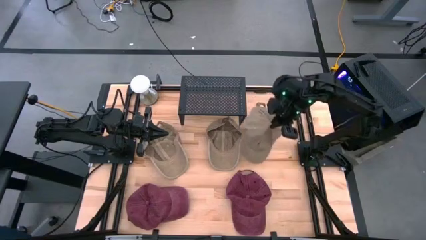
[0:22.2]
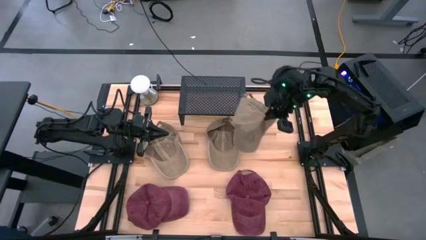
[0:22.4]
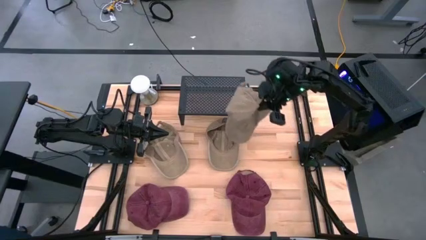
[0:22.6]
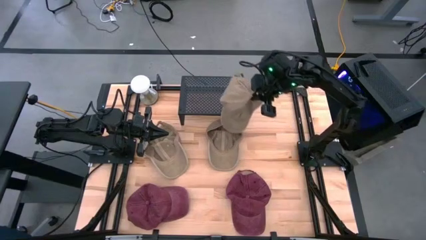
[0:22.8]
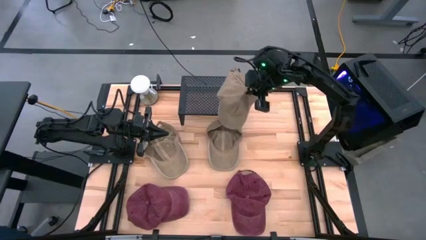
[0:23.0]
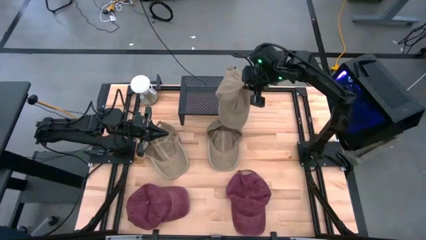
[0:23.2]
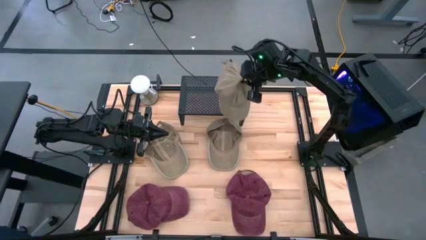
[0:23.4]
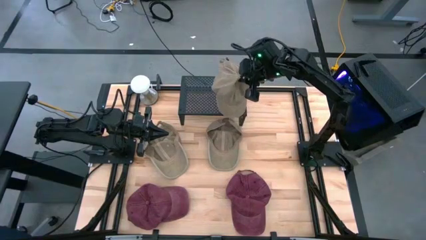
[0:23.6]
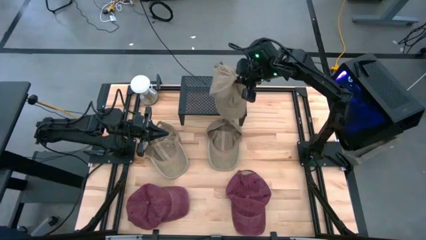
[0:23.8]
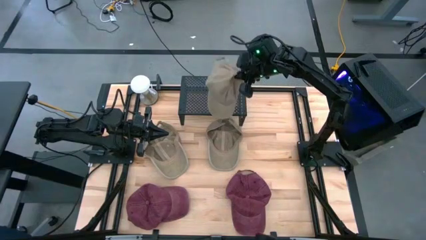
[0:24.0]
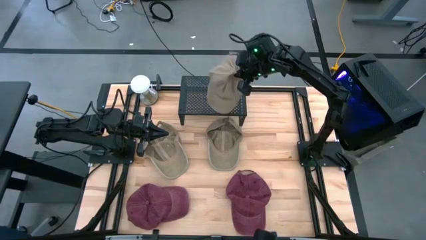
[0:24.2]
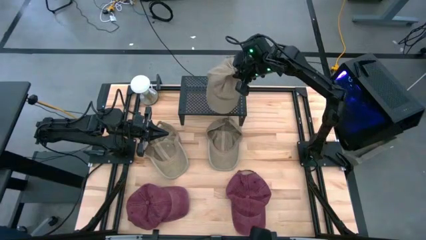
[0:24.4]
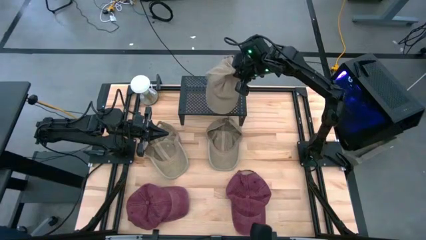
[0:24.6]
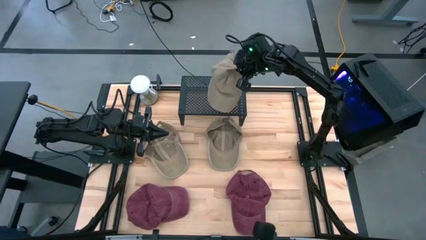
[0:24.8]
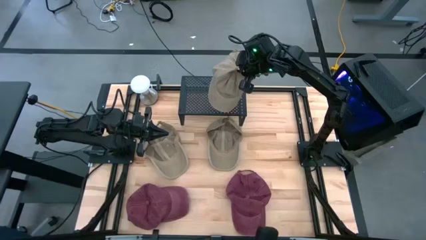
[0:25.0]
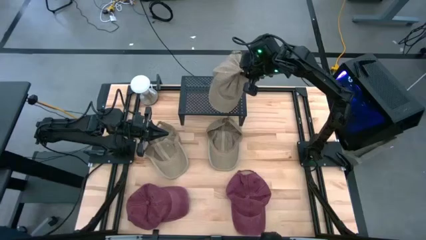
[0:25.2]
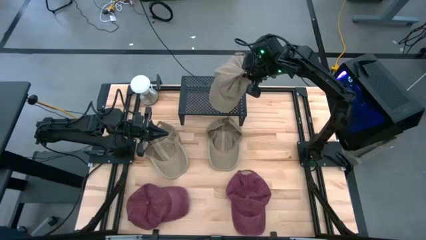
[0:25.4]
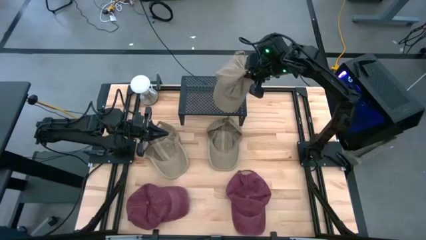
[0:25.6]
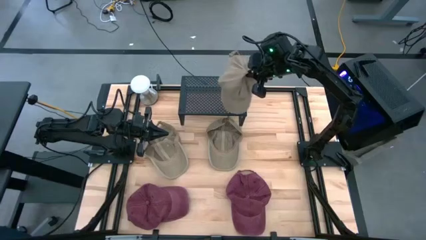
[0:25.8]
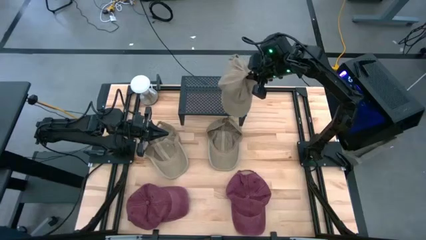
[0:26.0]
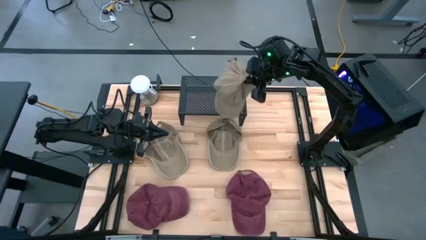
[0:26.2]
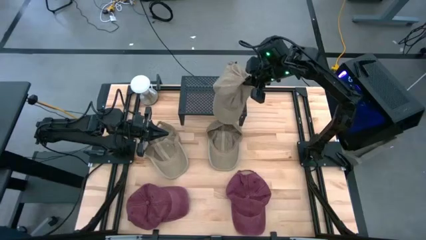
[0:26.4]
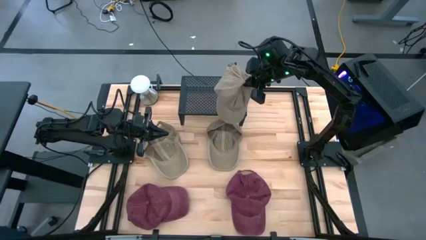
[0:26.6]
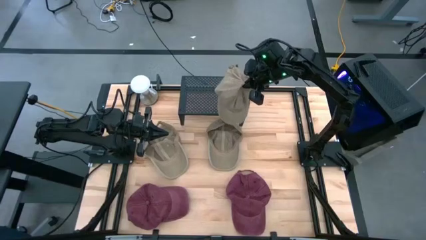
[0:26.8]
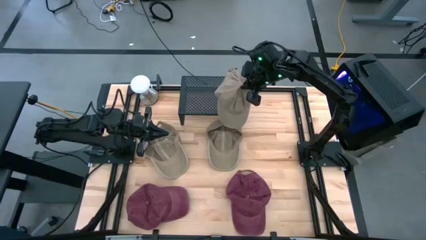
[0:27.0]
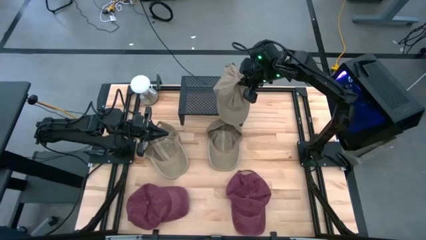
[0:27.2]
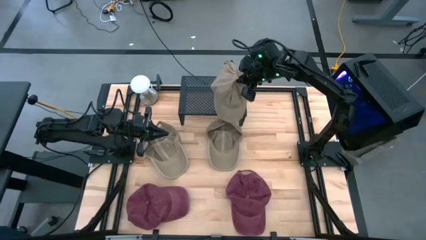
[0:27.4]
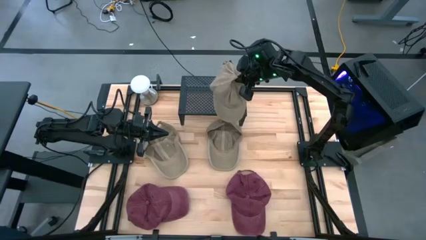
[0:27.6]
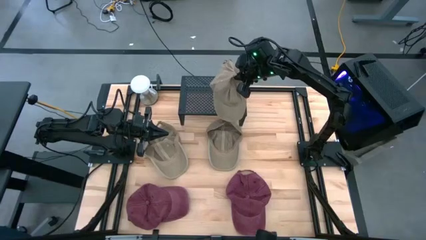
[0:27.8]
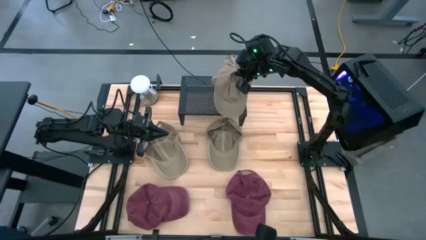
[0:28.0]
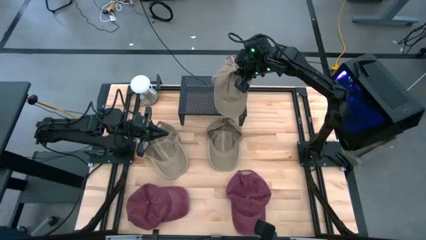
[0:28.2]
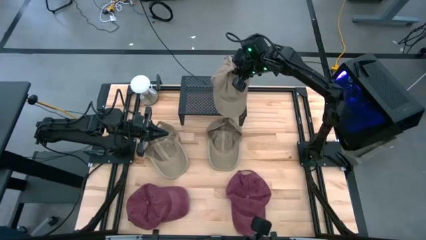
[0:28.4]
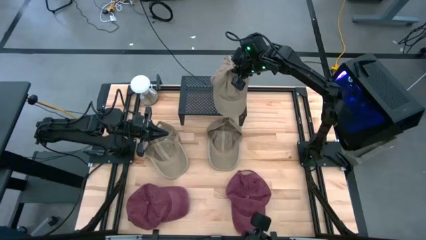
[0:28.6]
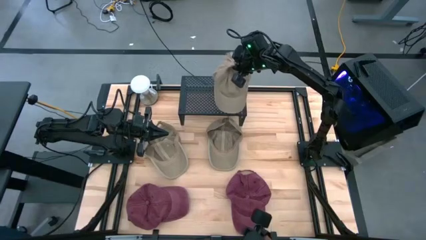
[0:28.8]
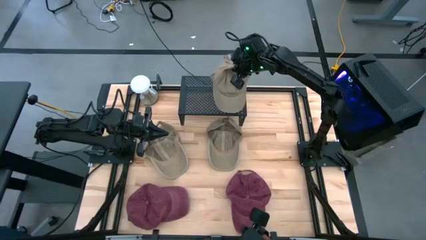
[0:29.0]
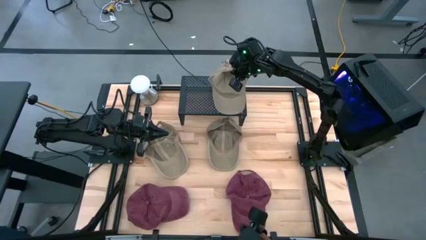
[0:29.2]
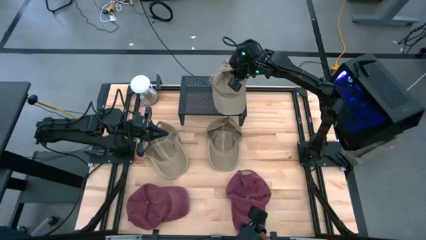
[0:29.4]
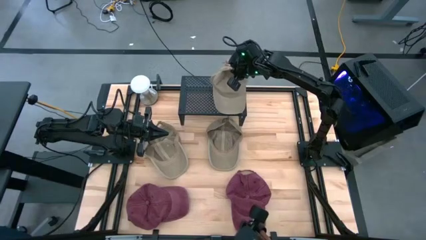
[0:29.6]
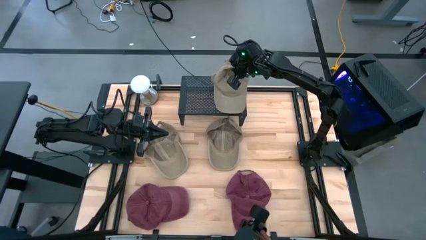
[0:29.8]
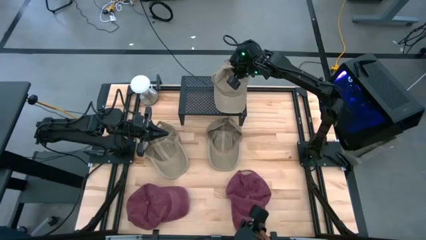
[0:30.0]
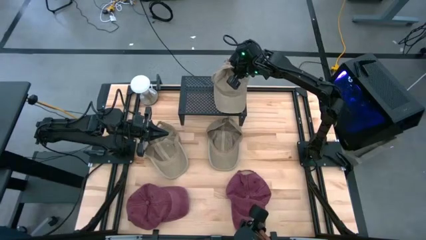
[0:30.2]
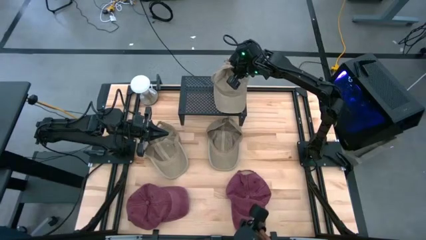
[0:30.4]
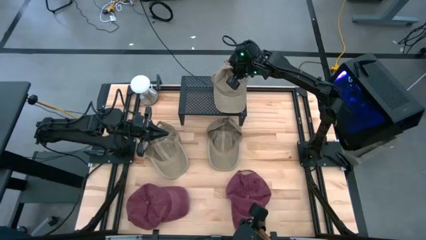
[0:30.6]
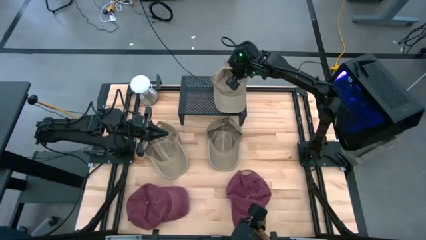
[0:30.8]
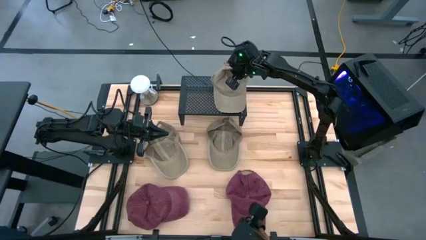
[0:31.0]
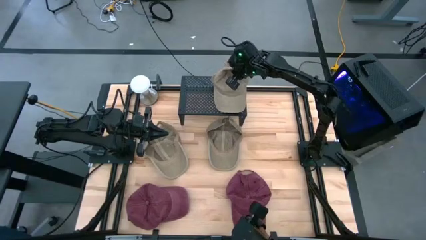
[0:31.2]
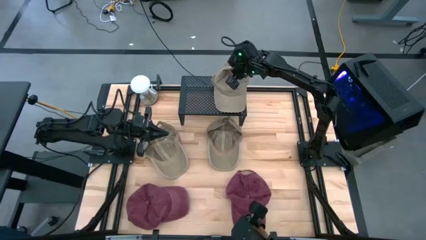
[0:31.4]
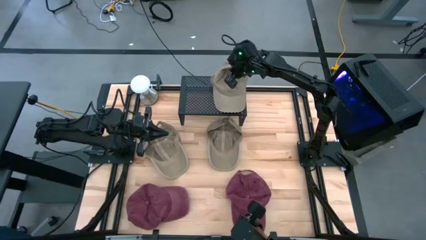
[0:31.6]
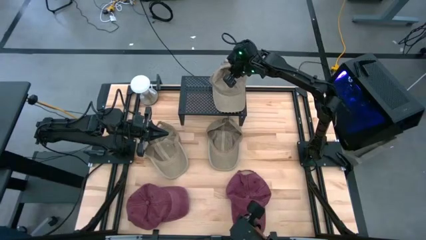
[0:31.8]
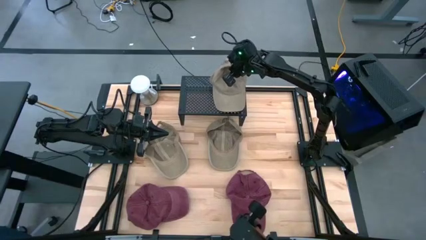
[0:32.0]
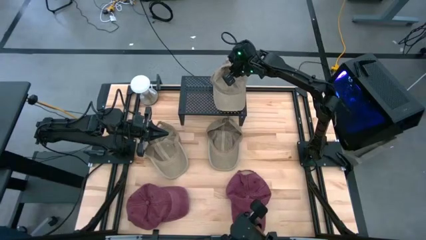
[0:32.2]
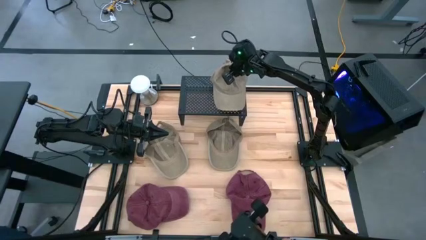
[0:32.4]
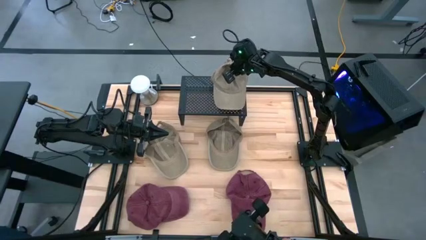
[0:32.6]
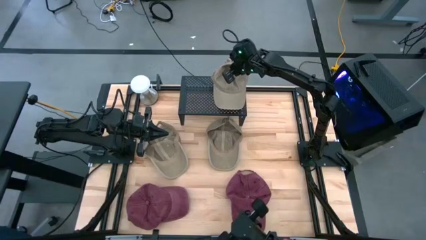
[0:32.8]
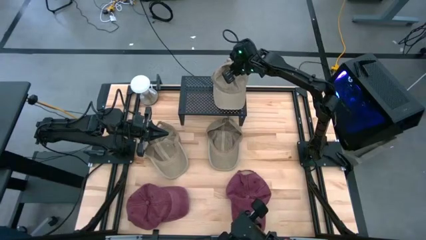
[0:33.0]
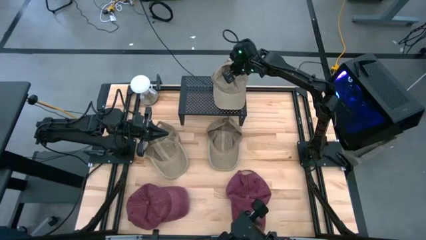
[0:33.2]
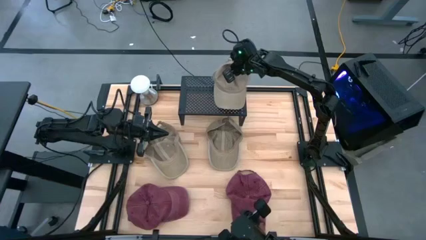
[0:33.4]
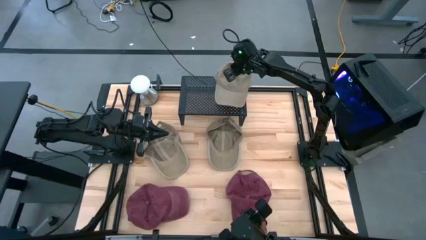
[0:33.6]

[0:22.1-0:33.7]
Task: Pick & Place hat
Put the right brown cap on the shelf
